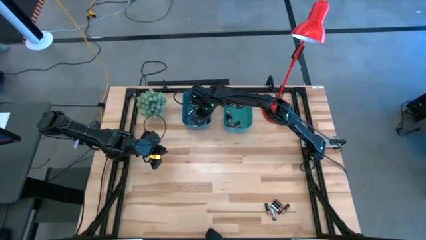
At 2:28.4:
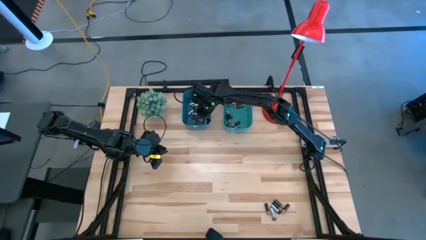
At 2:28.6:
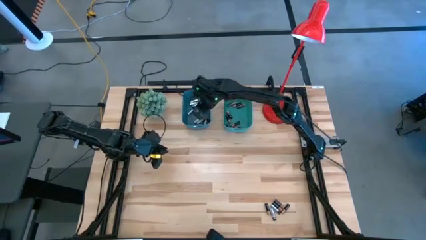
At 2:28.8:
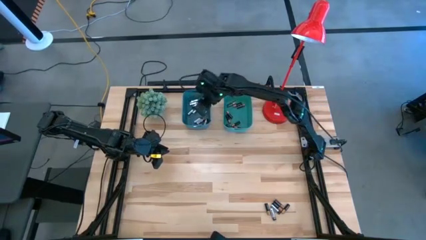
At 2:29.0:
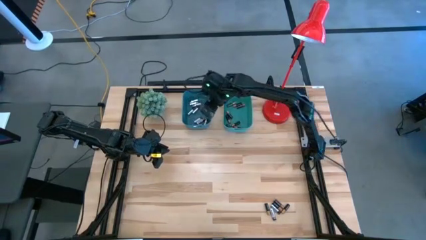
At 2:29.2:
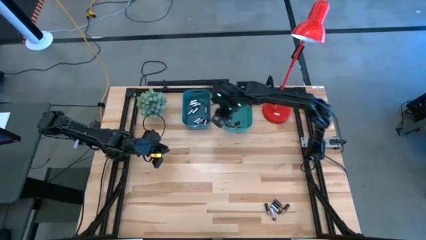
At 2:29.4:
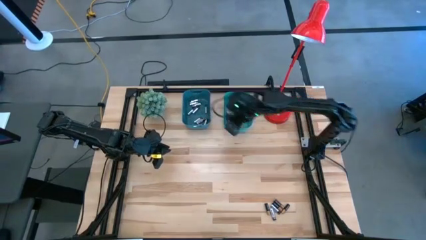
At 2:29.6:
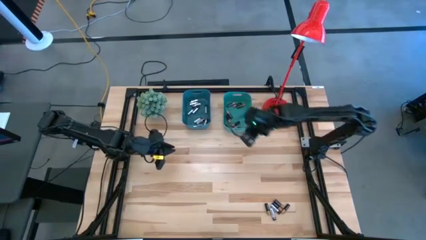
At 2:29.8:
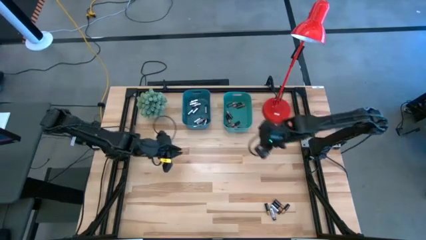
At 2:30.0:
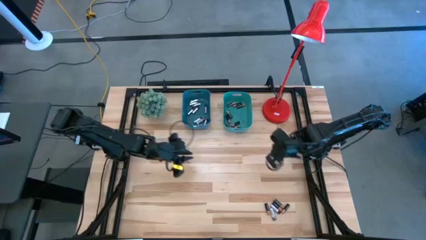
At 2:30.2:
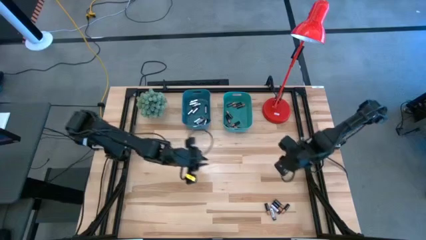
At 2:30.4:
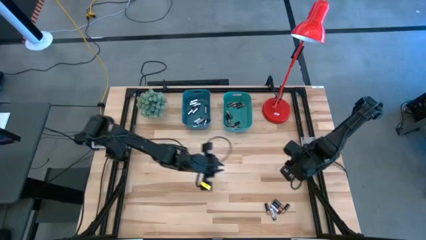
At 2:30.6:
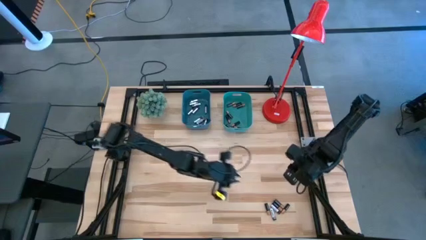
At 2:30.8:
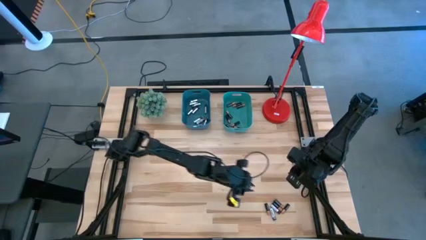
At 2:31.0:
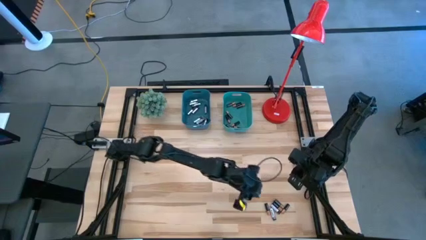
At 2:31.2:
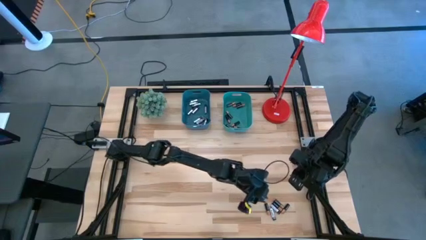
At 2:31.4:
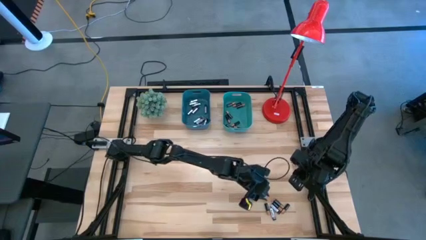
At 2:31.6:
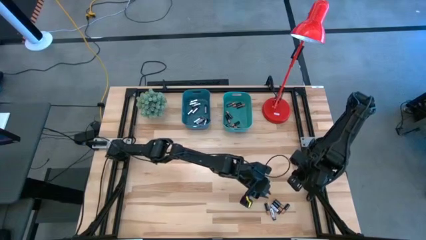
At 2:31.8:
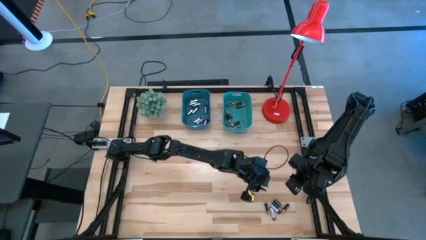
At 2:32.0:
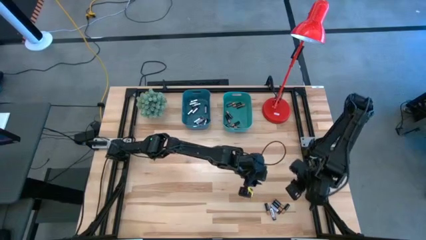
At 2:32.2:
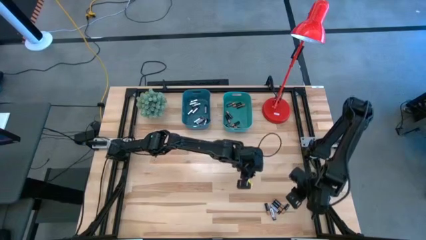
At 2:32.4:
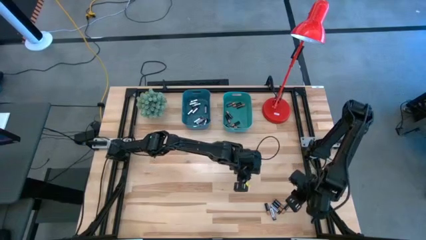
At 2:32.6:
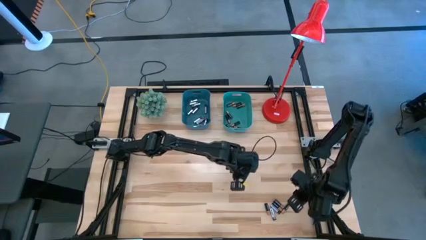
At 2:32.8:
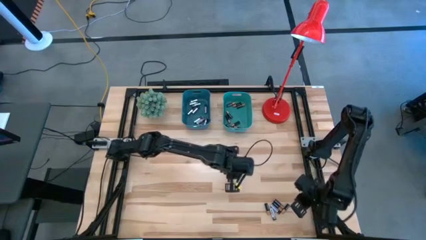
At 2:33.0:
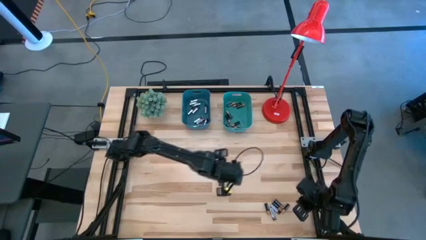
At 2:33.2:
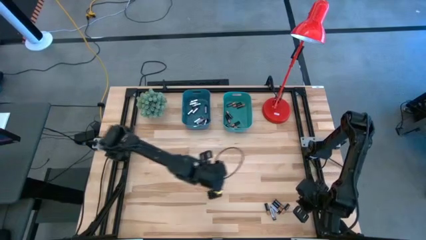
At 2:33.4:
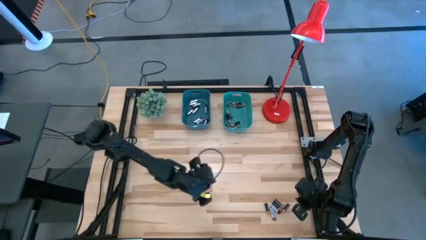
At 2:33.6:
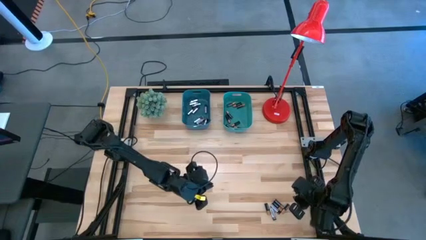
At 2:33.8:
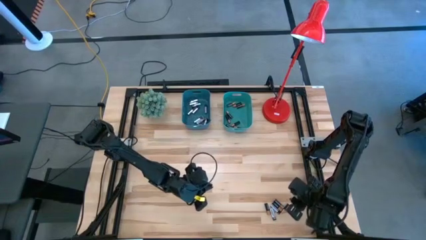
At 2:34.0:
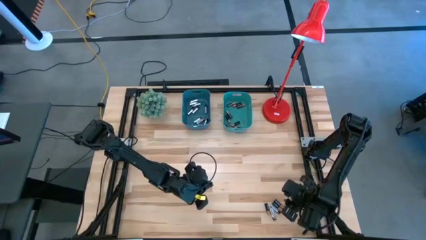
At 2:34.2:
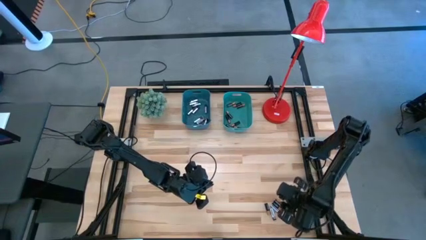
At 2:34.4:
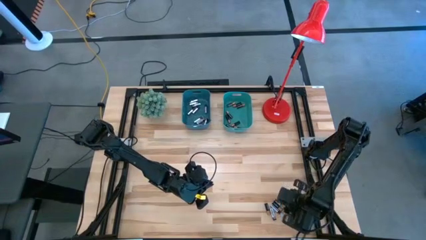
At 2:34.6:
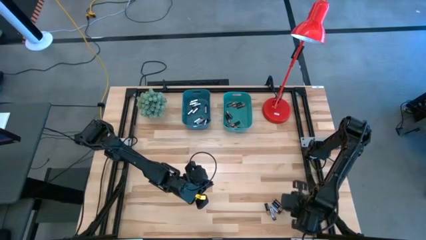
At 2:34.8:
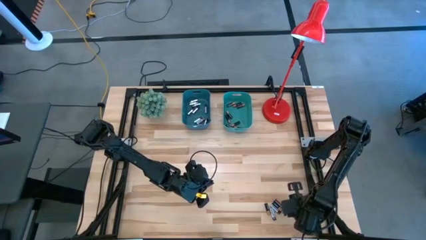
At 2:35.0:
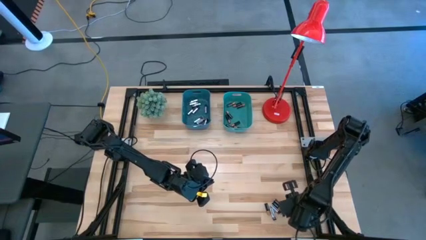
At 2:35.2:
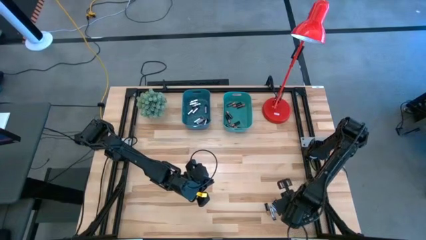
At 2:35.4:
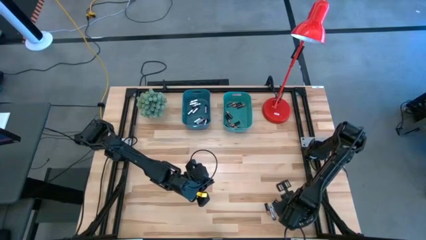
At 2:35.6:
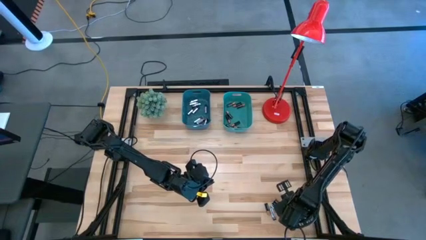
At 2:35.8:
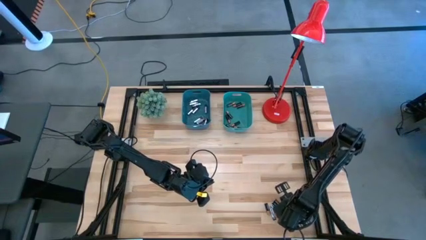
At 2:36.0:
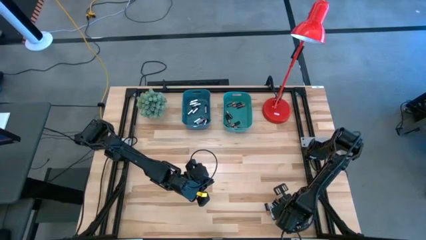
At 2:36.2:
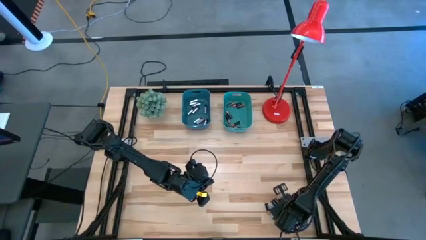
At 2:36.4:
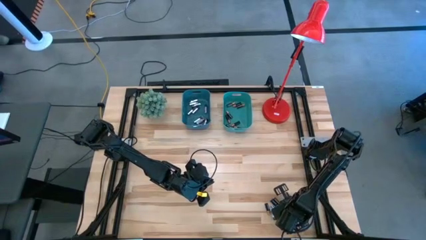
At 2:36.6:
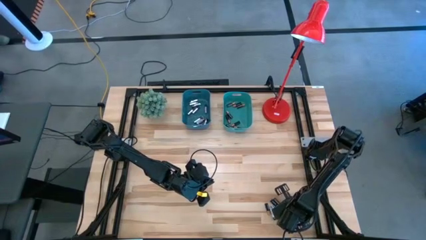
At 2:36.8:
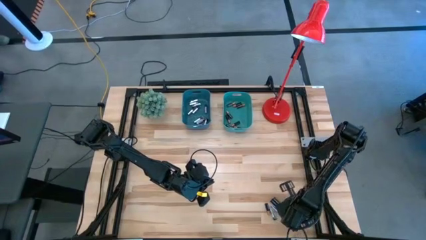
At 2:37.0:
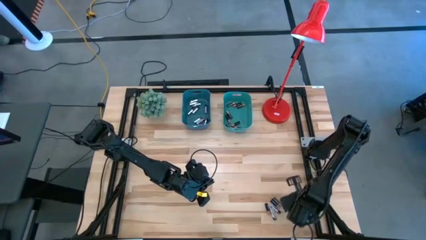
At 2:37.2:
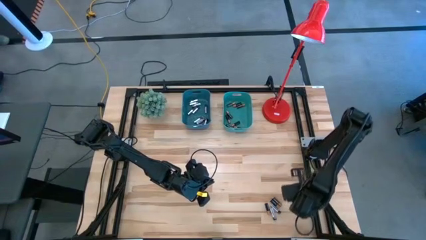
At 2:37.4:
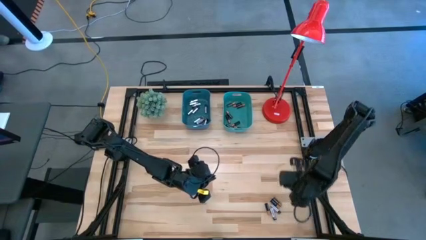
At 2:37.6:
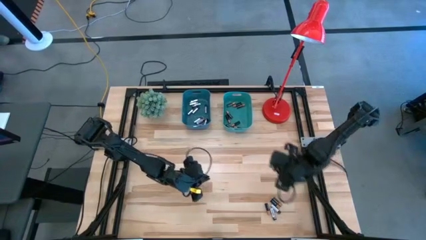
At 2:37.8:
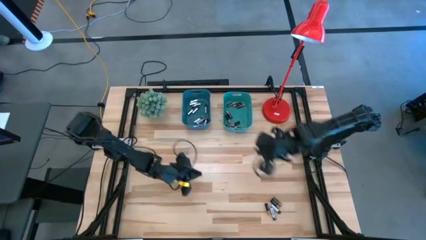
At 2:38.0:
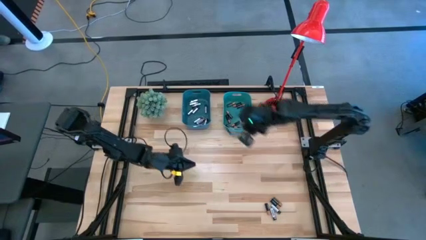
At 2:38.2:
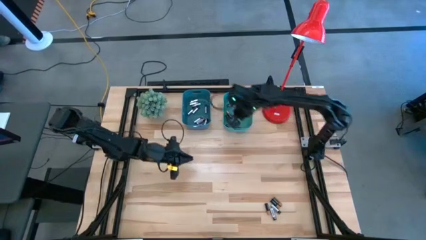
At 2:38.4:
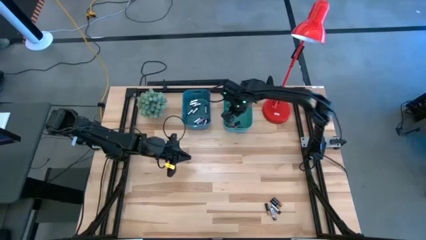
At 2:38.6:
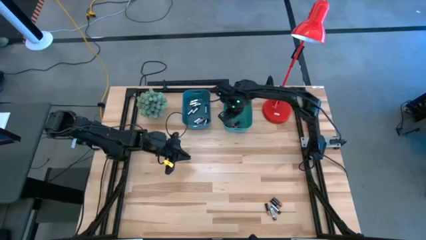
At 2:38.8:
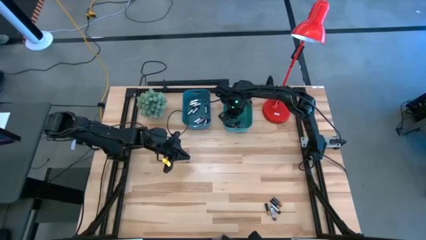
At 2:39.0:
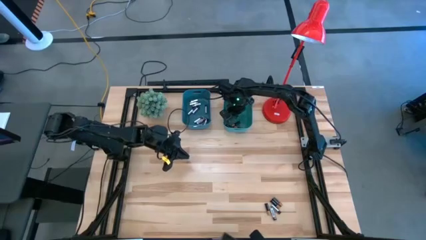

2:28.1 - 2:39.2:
Task: Sort batteries
Put the black battery into the green bin

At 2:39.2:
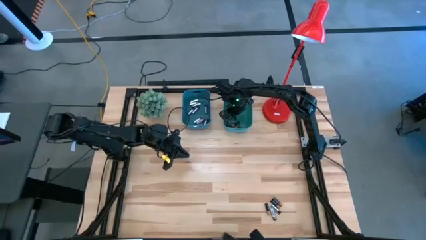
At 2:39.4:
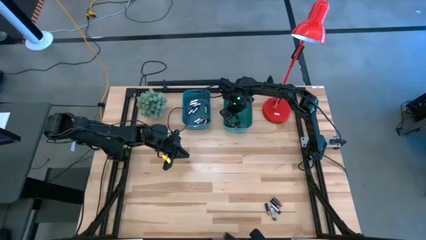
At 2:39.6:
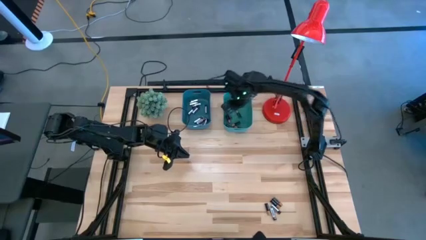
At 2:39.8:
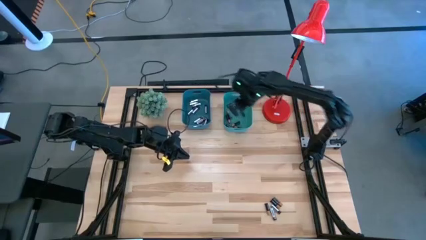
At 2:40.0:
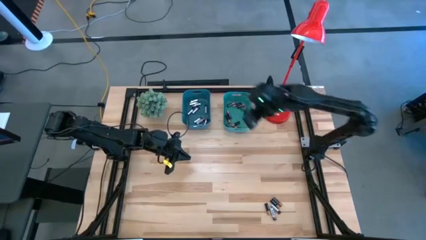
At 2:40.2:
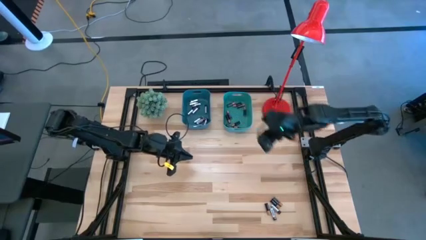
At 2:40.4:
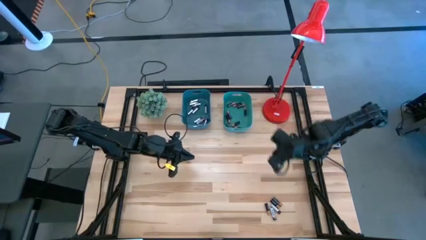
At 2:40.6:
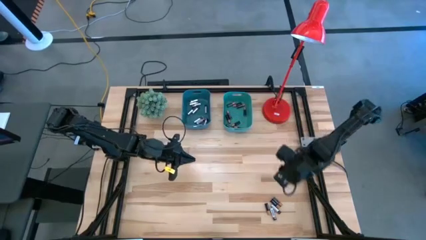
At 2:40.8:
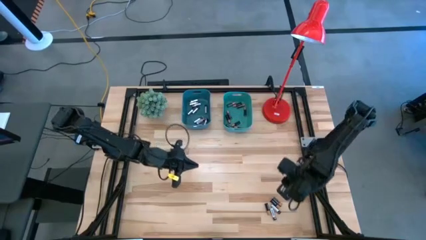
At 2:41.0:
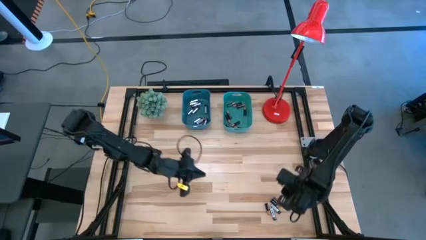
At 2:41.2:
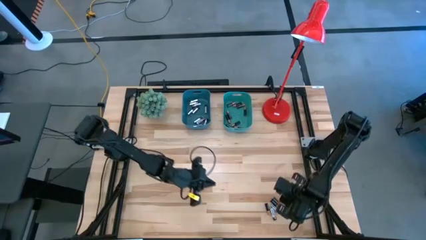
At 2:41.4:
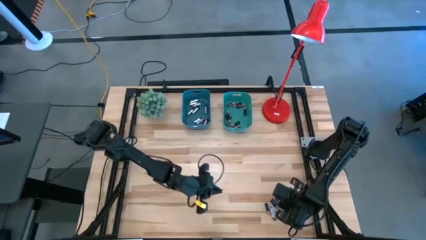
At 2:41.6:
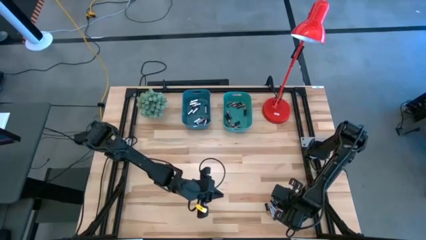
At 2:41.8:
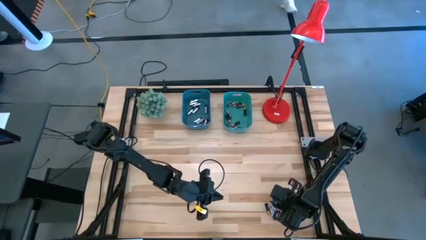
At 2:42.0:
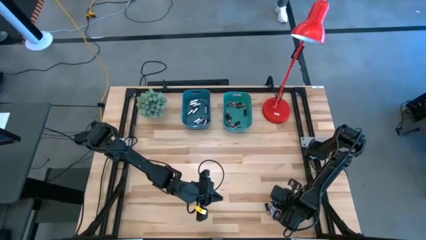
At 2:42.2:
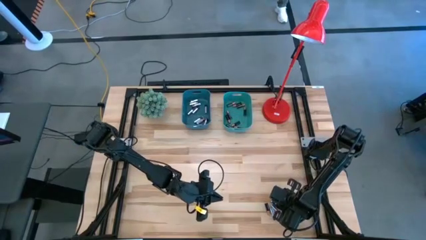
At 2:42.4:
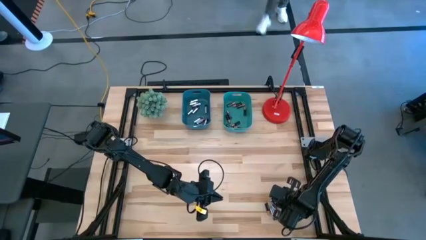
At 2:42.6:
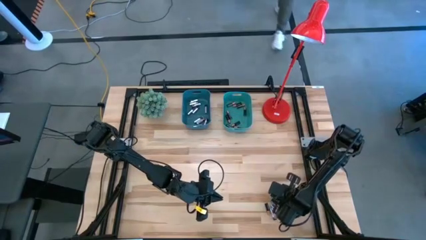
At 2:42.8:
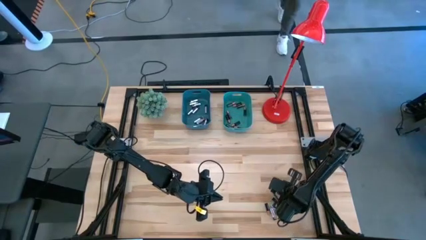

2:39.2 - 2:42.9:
Put the black battery into the green bin
